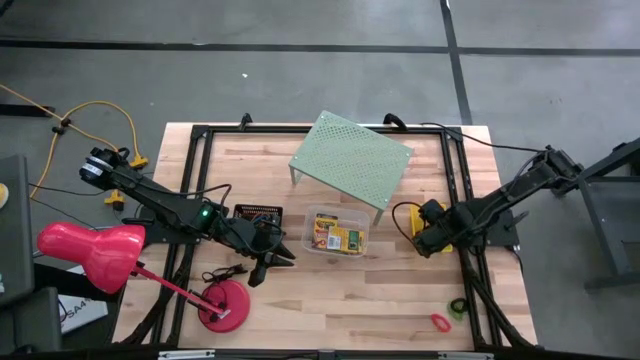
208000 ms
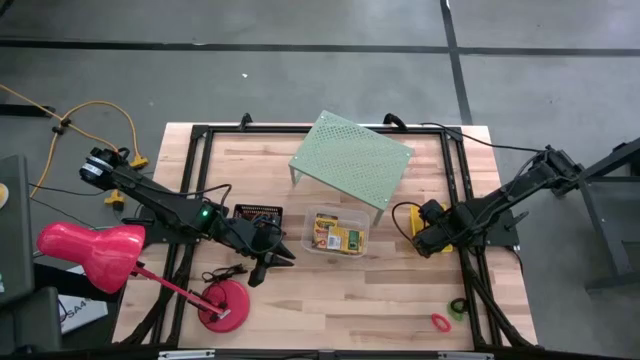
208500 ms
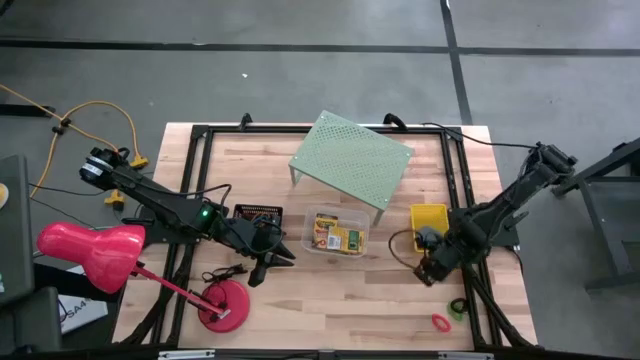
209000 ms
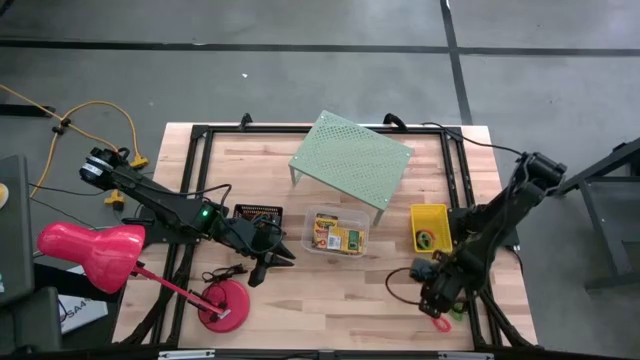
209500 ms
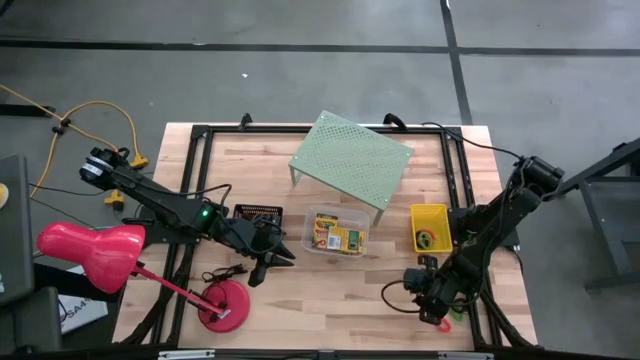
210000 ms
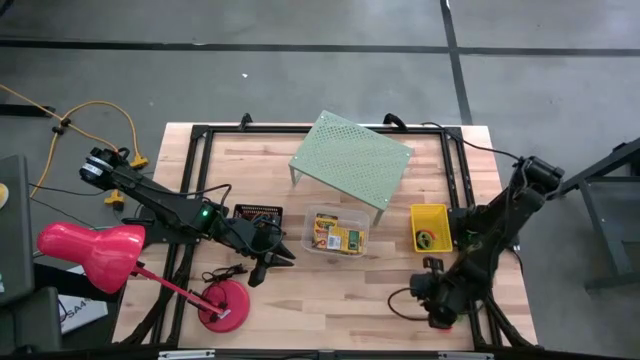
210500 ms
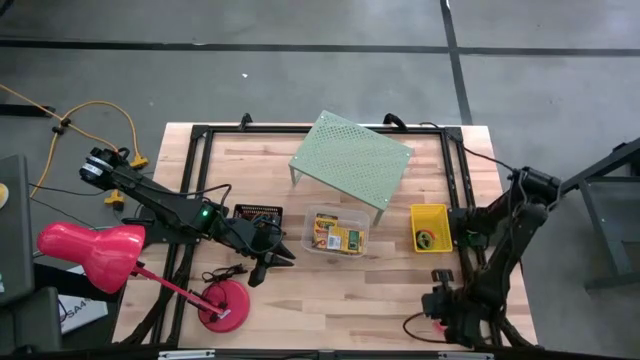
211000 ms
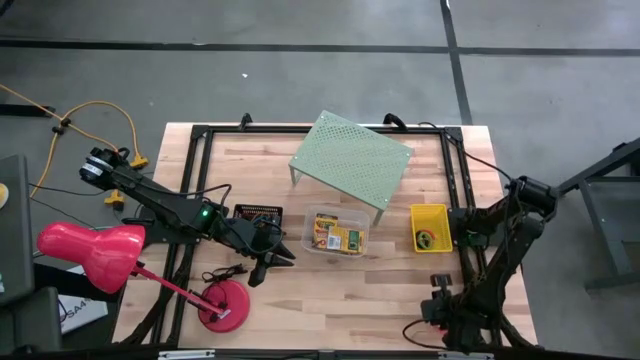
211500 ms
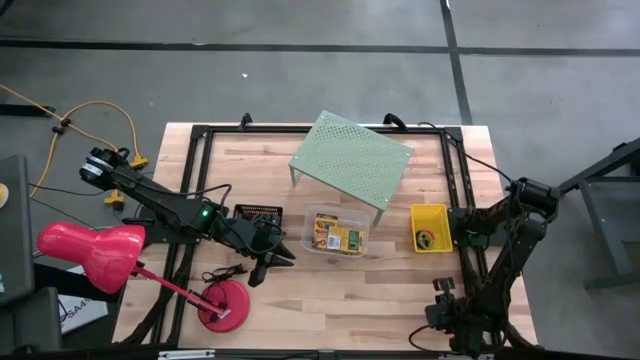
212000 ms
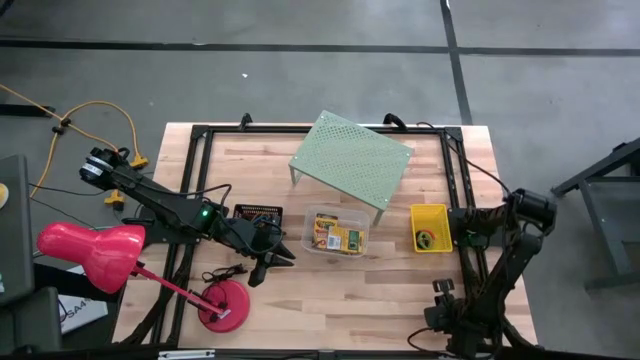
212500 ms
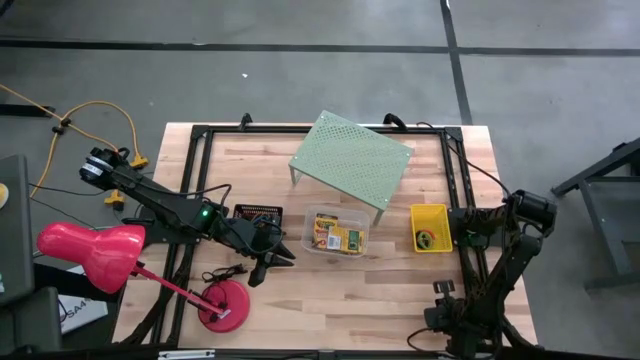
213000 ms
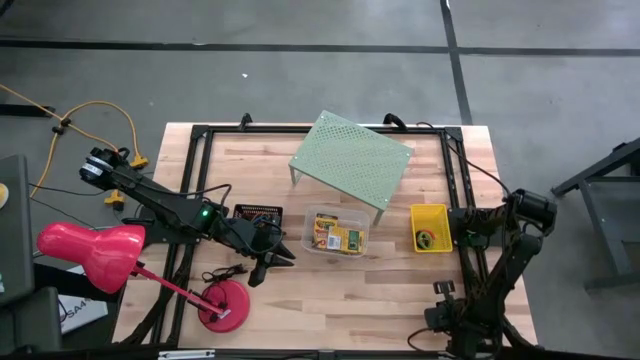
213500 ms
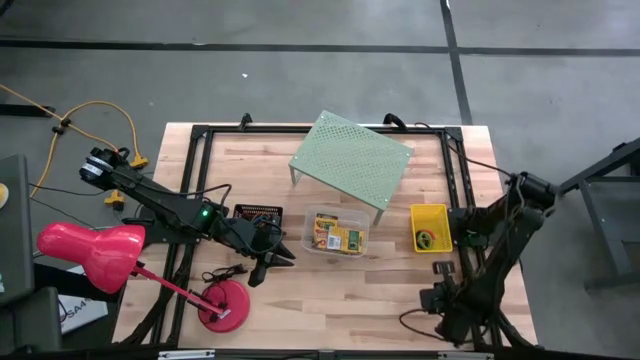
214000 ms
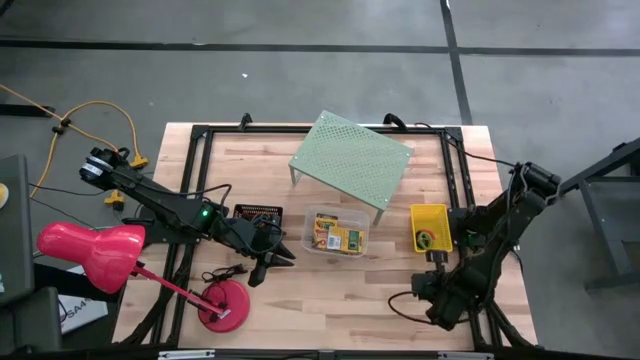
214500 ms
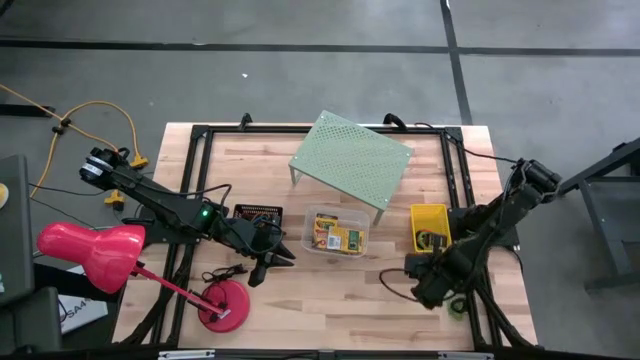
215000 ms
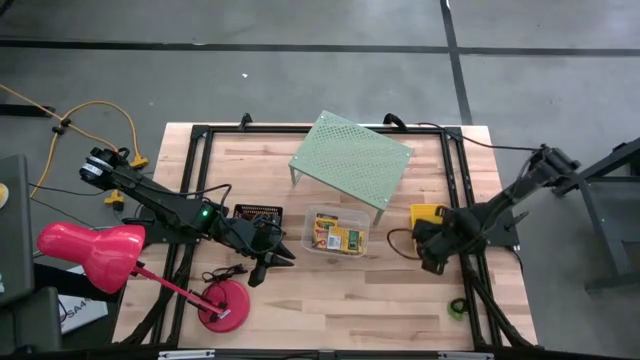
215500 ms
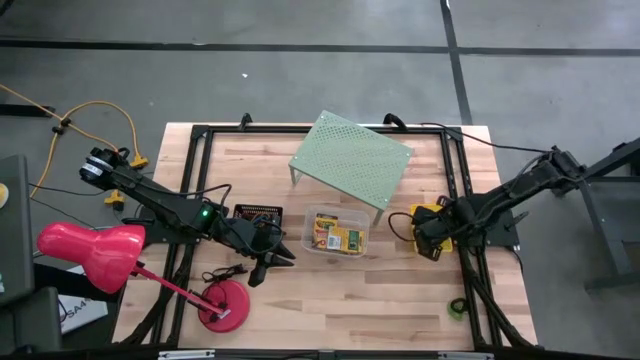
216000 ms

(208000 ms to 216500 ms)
Task: Pick & Place Office Desk Supplies
Put the red spring keychain into the yellow bin

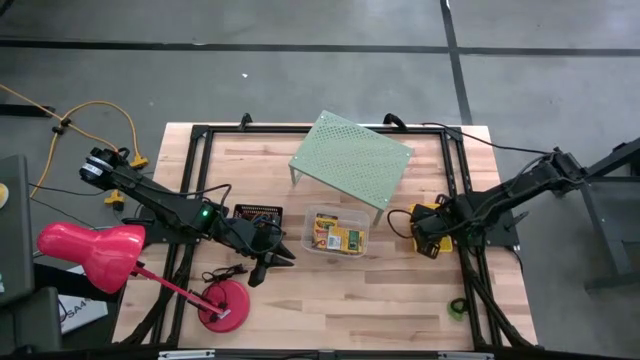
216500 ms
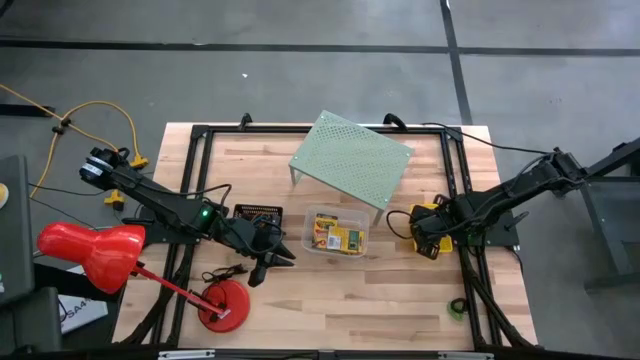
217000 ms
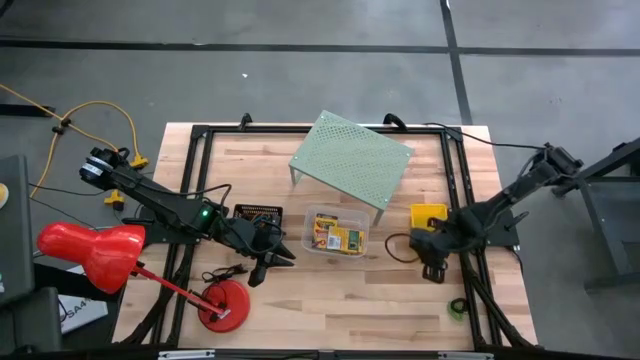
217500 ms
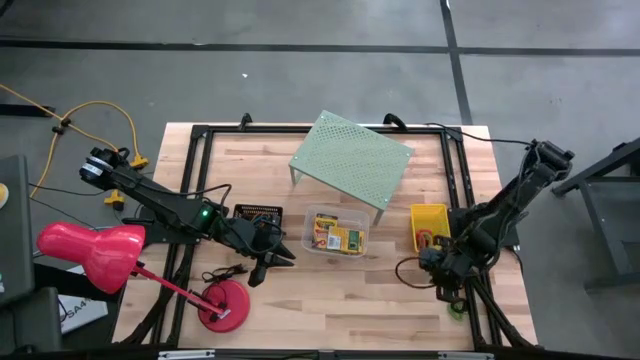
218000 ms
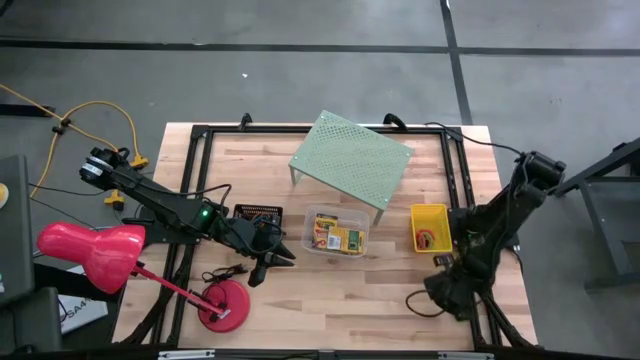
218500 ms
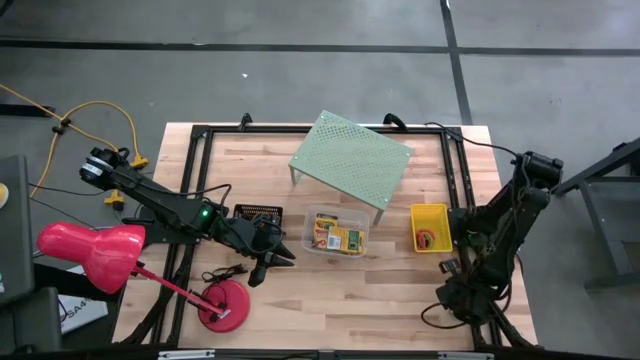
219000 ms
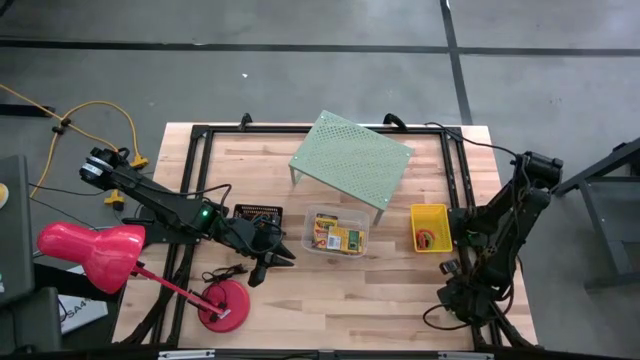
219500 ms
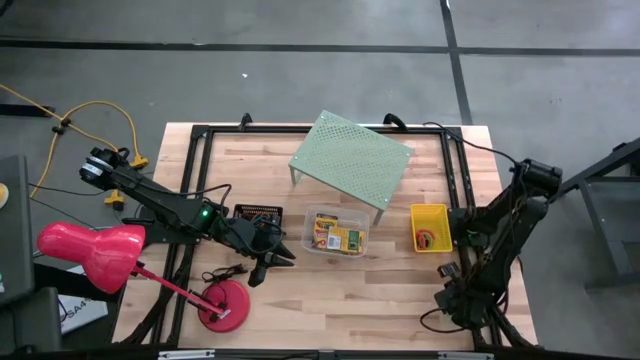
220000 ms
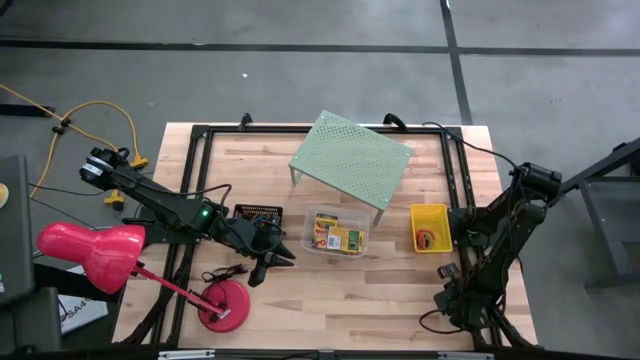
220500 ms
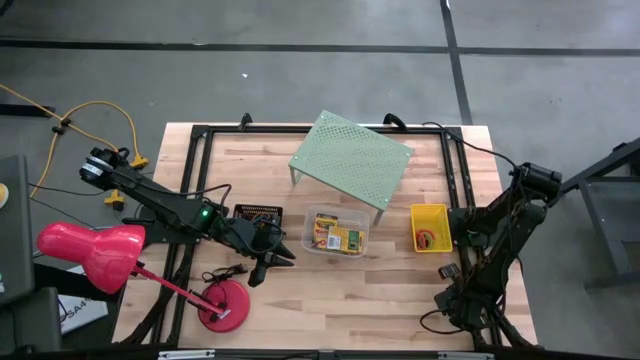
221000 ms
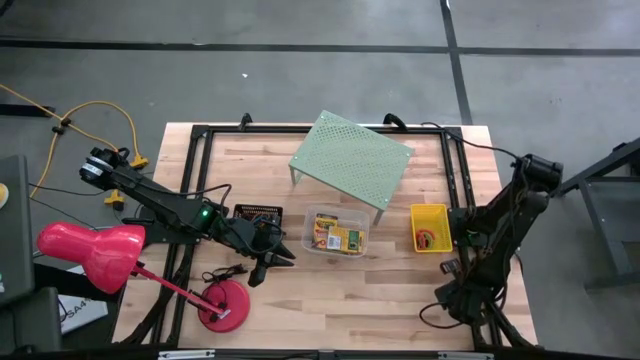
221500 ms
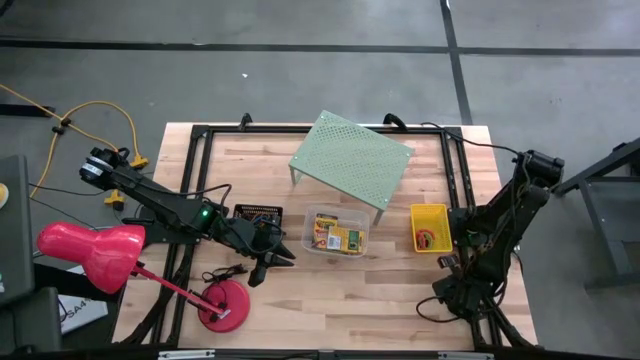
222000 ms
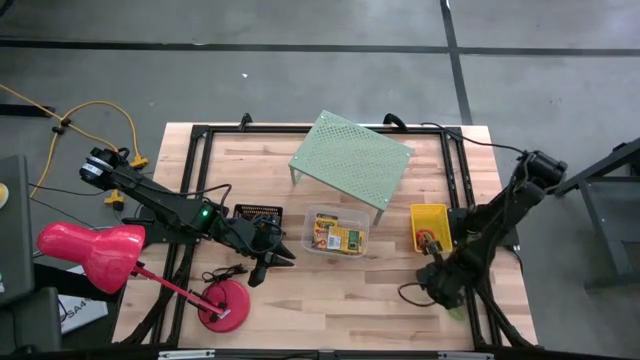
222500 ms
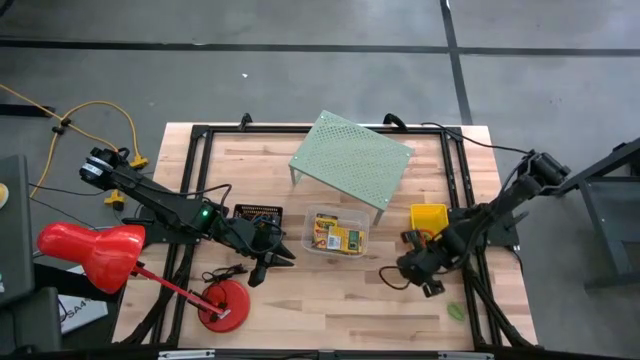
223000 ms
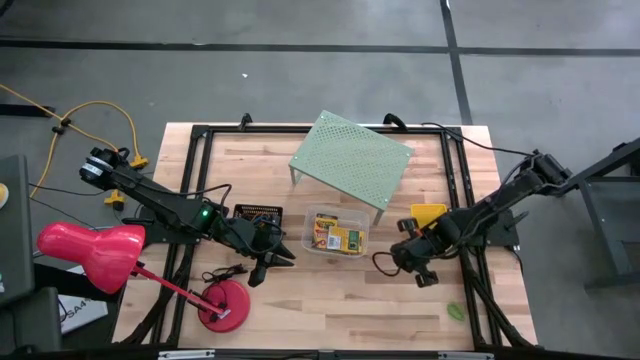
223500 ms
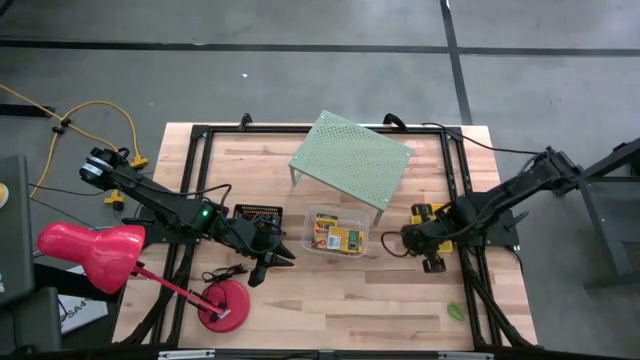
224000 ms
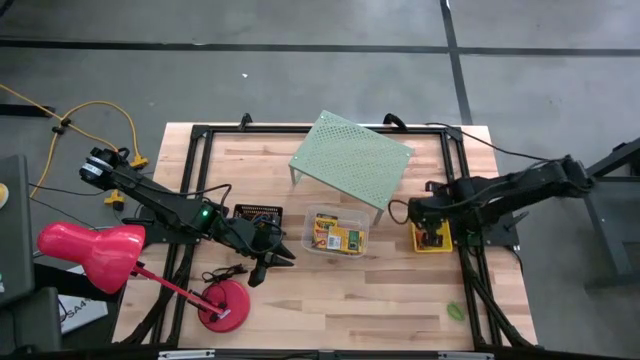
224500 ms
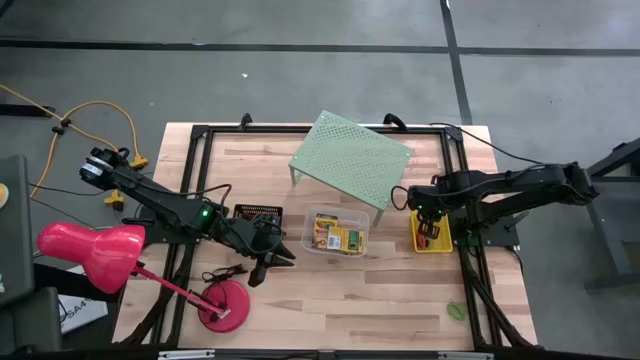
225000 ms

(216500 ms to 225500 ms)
Put the black spring keychain into the yellow bin

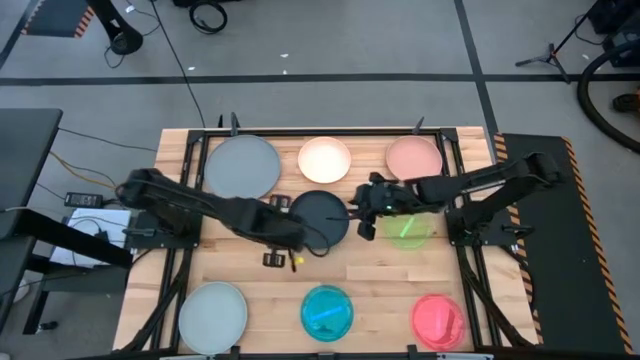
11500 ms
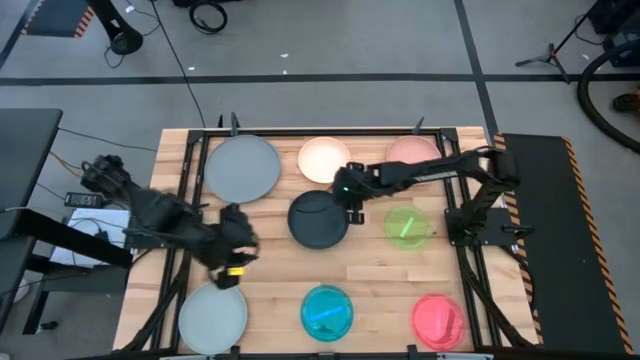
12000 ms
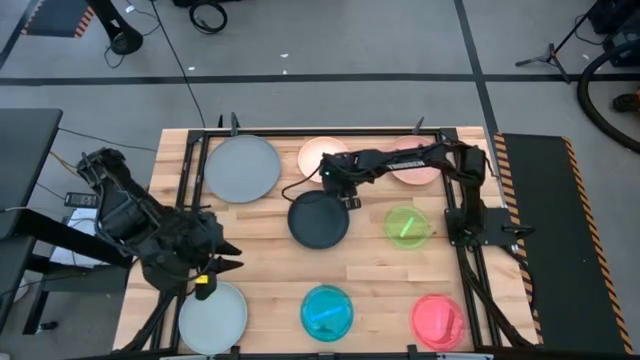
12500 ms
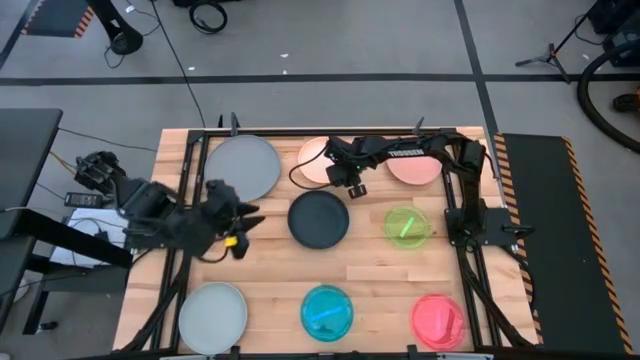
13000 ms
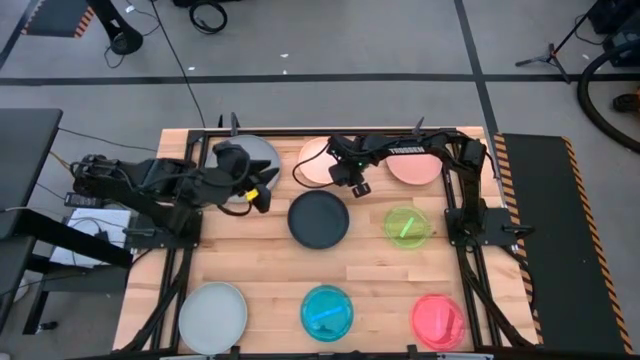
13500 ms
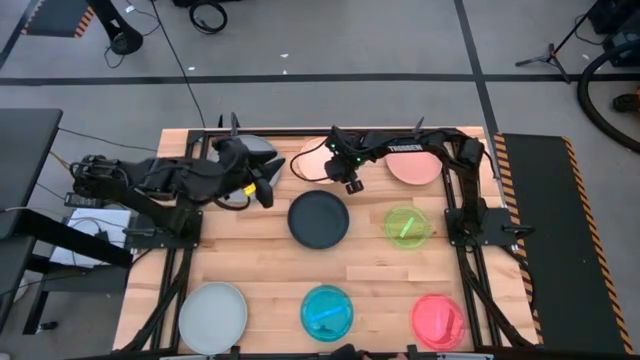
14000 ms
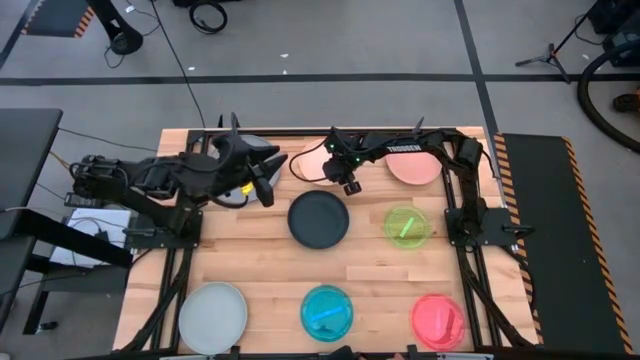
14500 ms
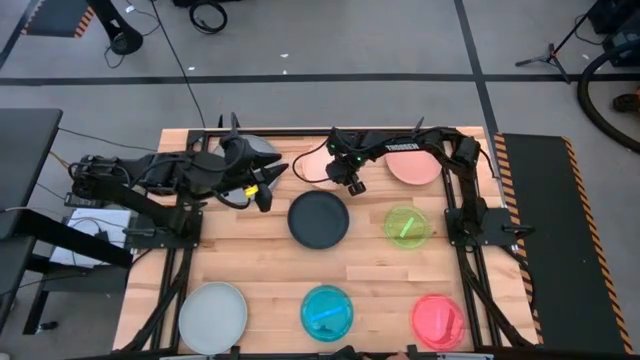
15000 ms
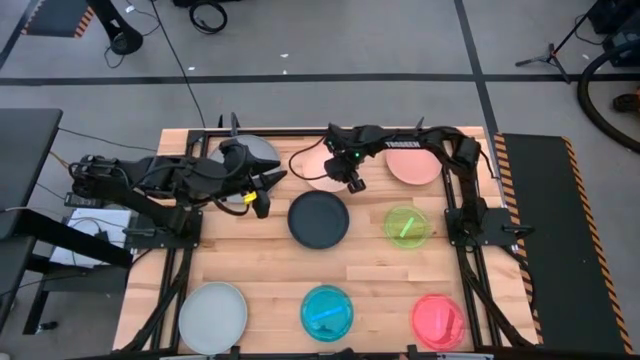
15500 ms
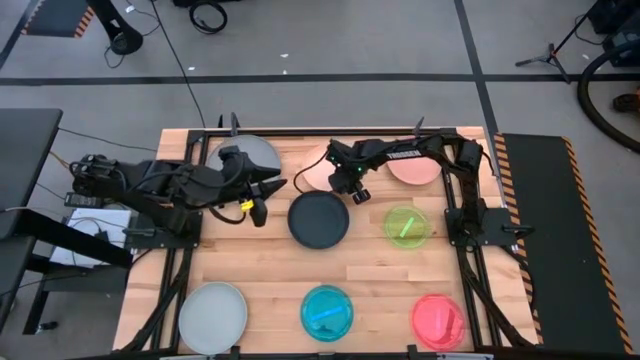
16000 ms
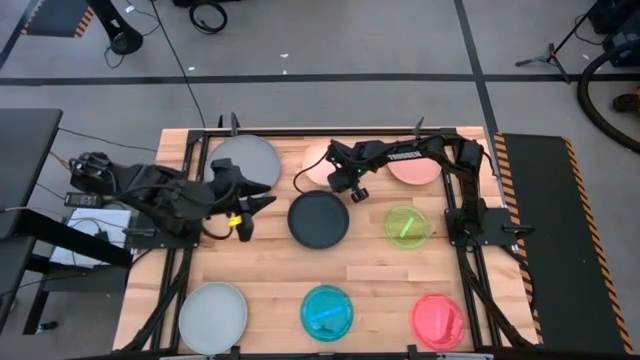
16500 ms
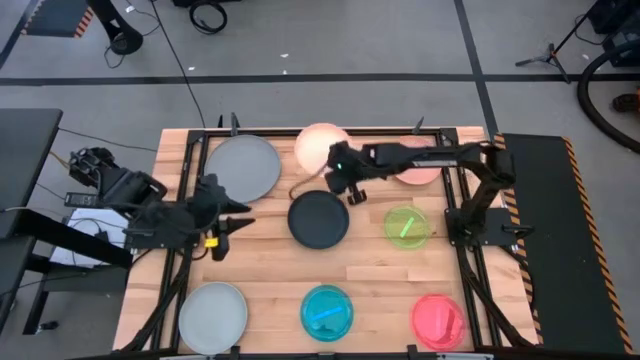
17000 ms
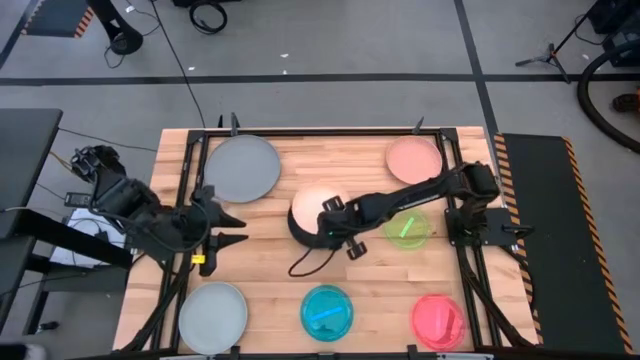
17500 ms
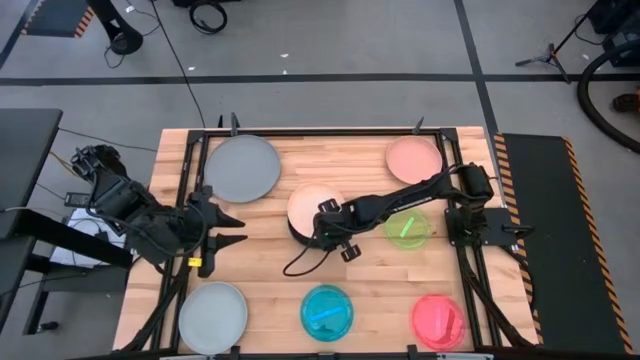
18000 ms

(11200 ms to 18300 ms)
Task: Stack plastic plates
Stack the orange plate on the black plate
